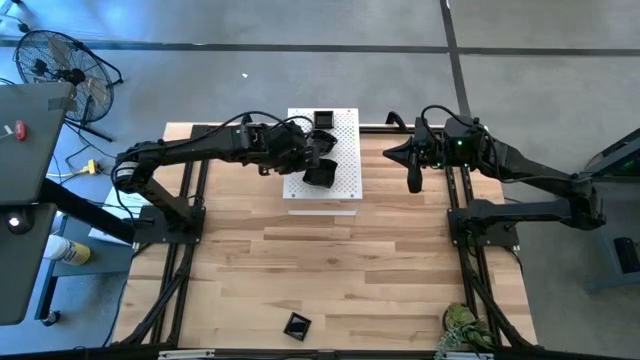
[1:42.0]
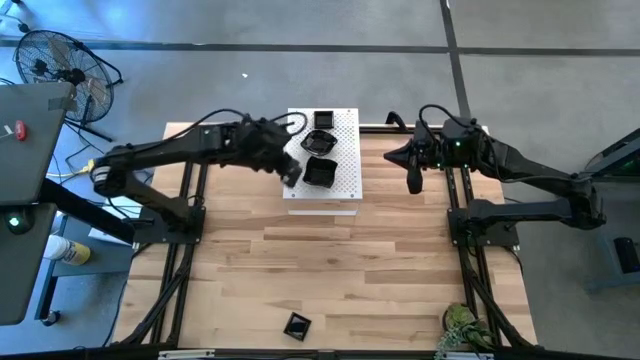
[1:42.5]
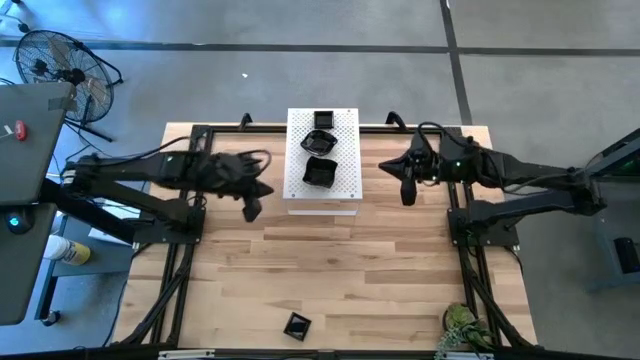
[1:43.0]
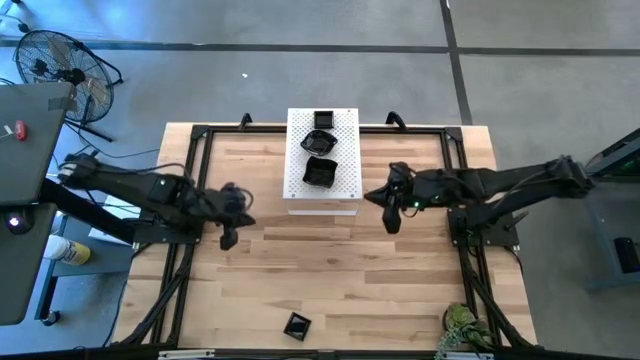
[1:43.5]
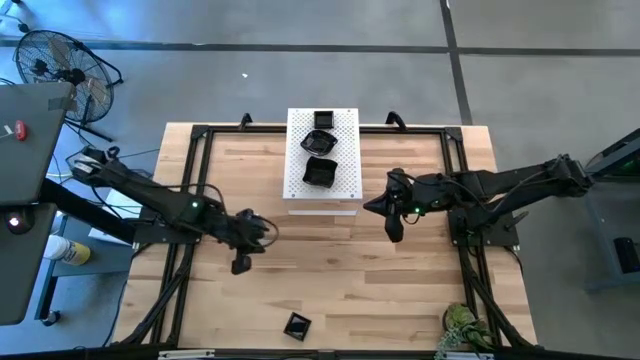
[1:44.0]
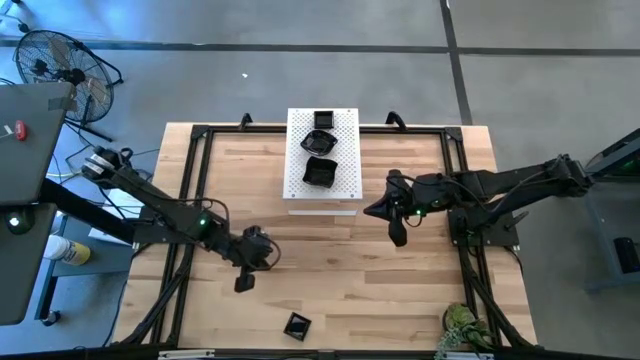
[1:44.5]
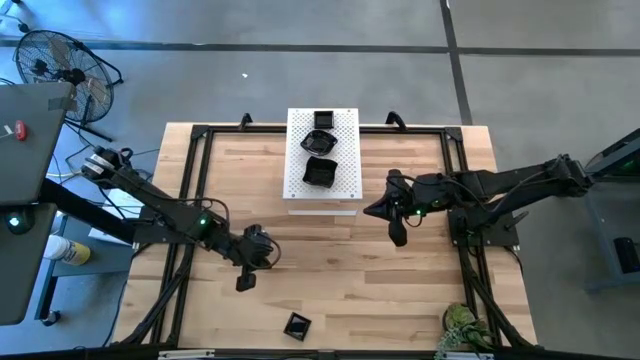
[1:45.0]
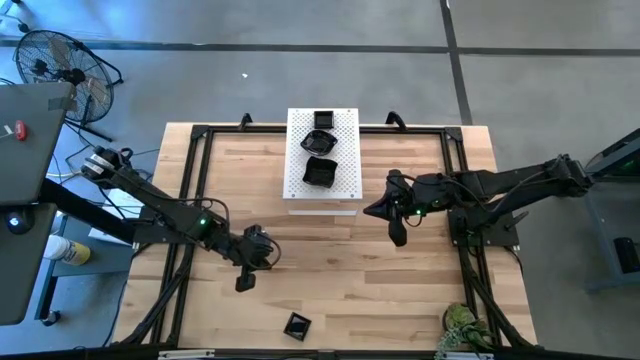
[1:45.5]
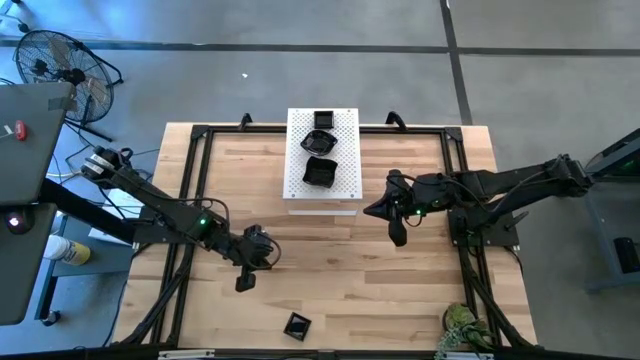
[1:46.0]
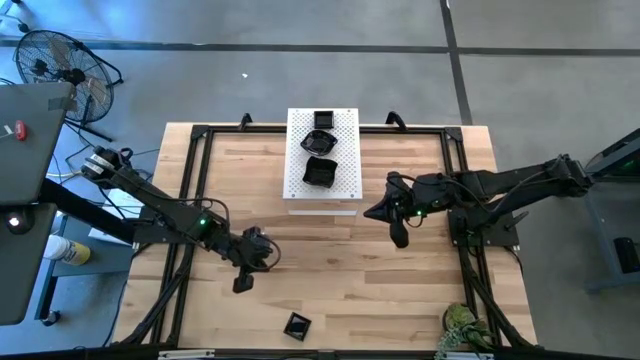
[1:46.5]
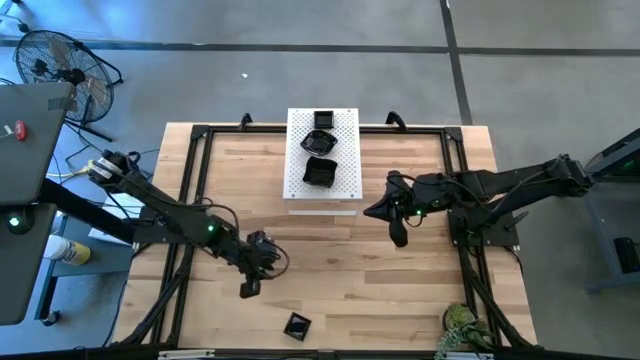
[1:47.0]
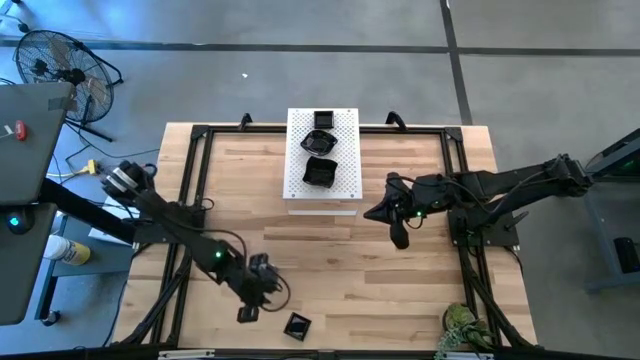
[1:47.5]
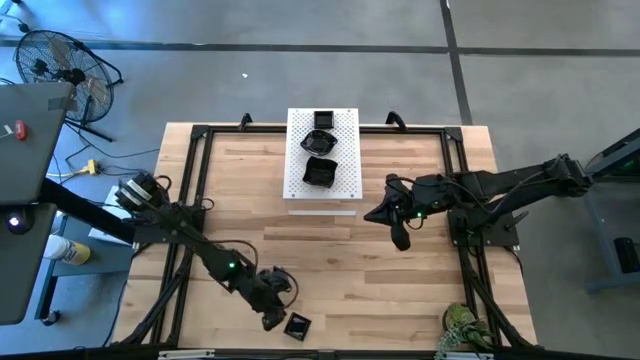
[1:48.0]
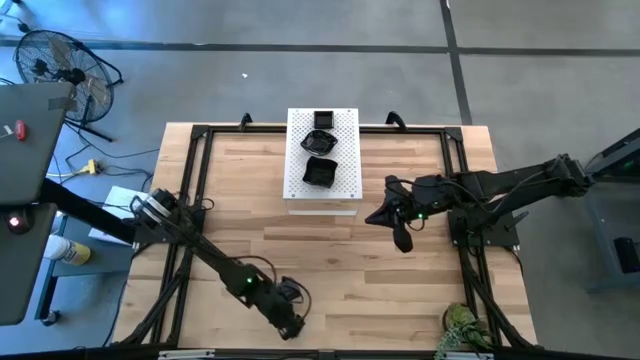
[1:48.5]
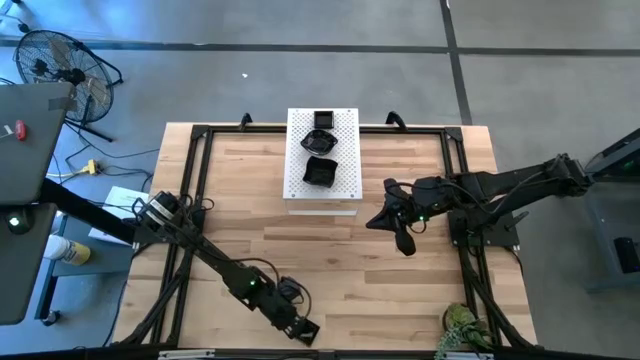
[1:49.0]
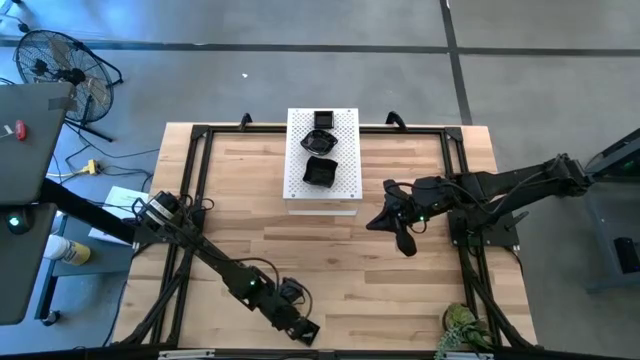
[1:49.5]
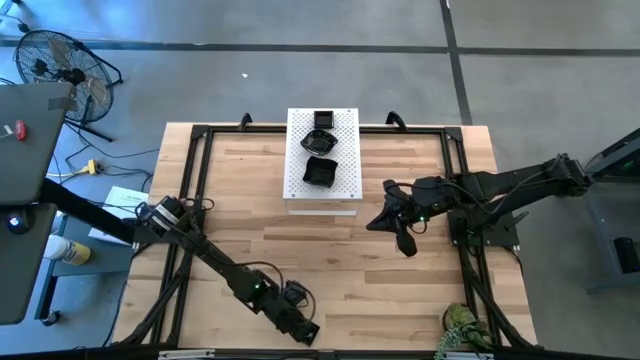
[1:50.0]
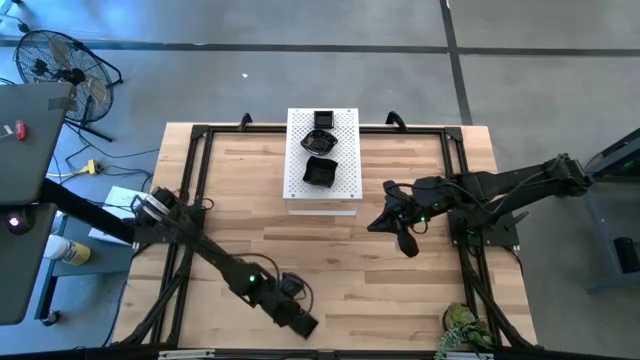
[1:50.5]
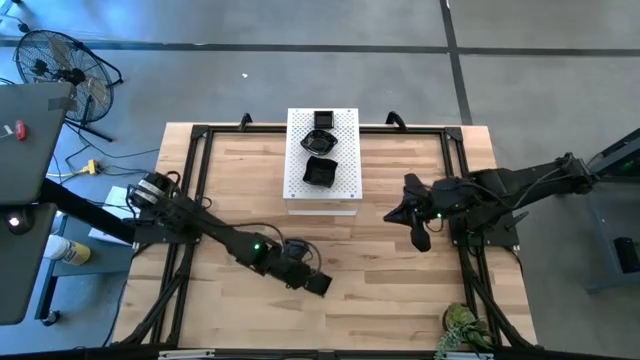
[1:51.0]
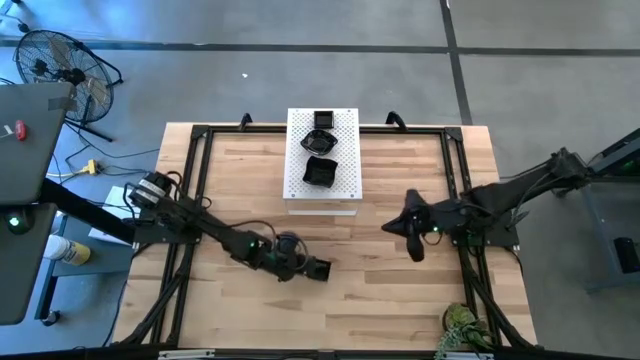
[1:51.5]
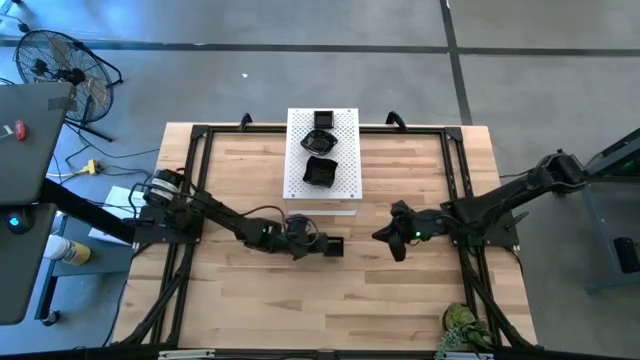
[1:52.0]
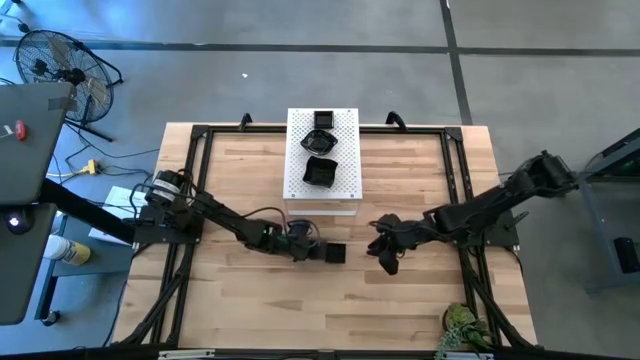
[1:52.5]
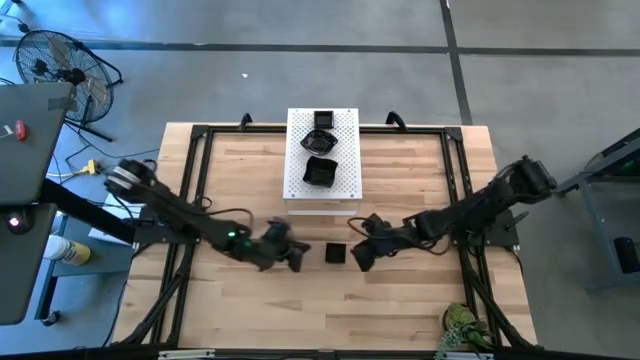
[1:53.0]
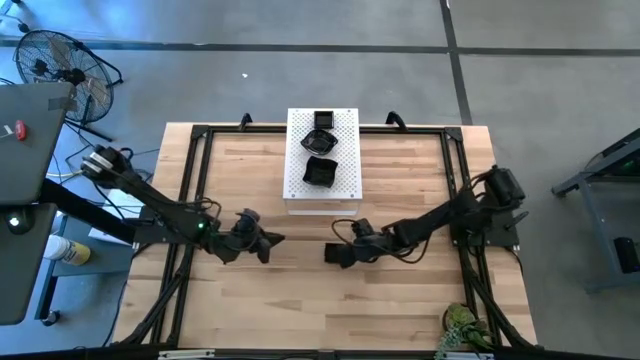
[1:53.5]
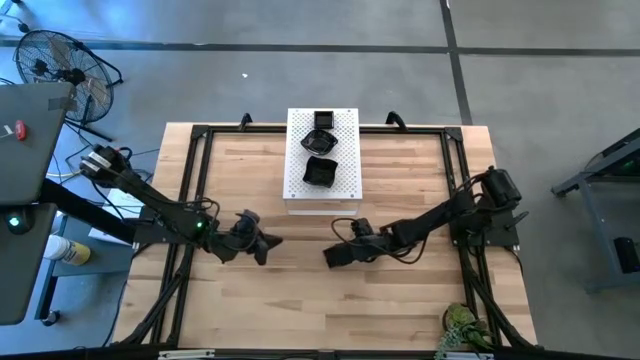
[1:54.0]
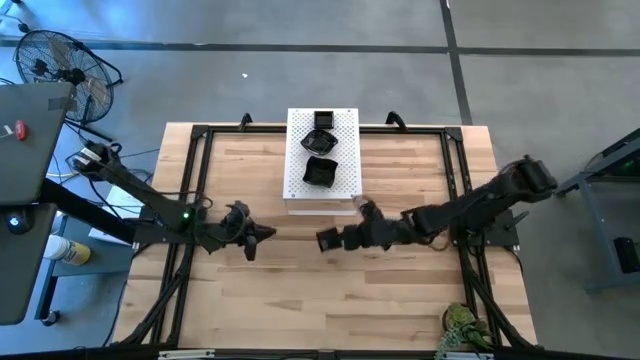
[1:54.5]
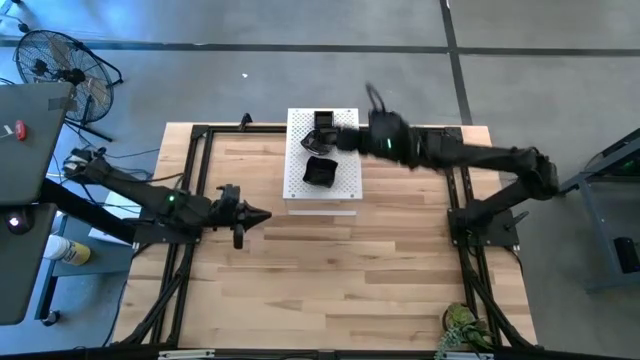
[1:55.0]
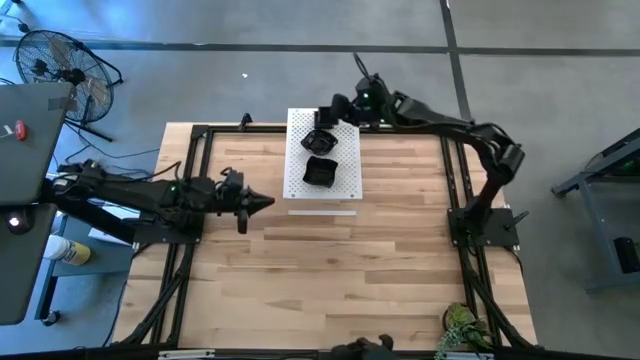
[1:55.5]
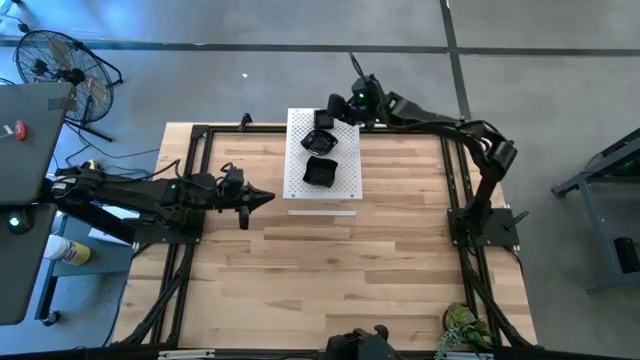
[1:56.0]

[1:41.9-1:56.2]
Task: Pick & Place Mini shaped plates
Stack the square plate on top of the square plate on the shelf

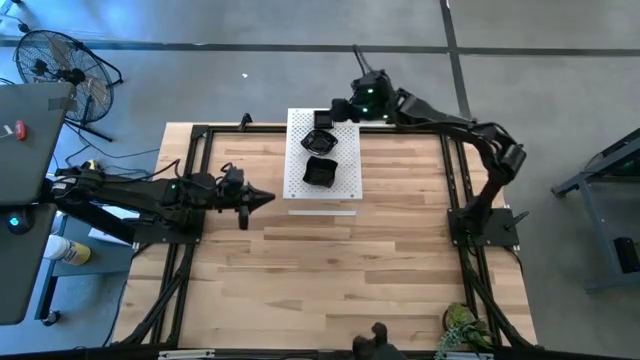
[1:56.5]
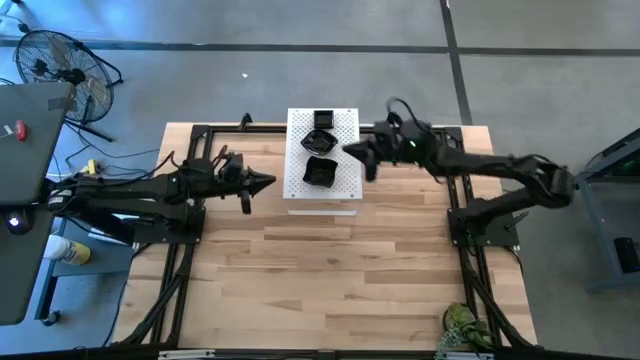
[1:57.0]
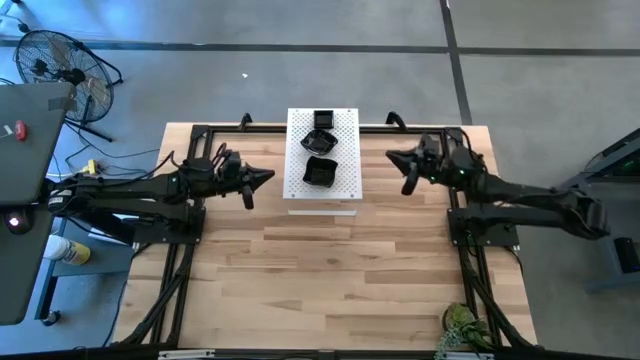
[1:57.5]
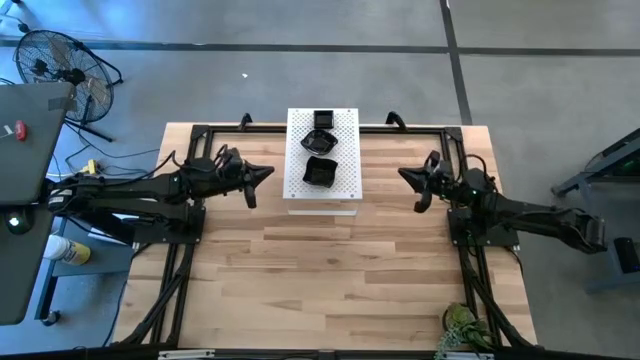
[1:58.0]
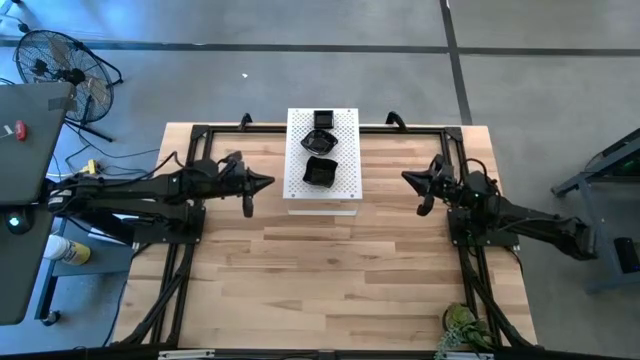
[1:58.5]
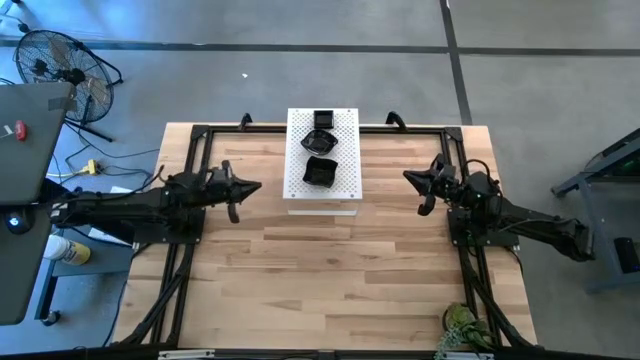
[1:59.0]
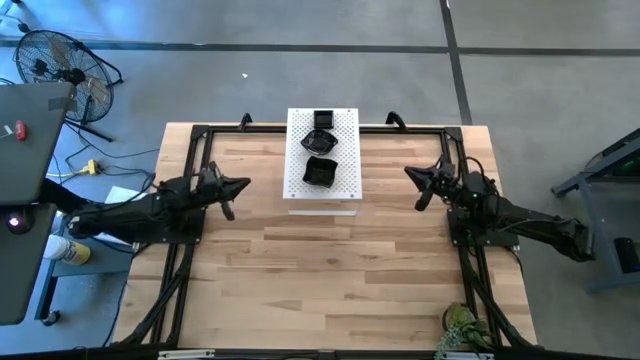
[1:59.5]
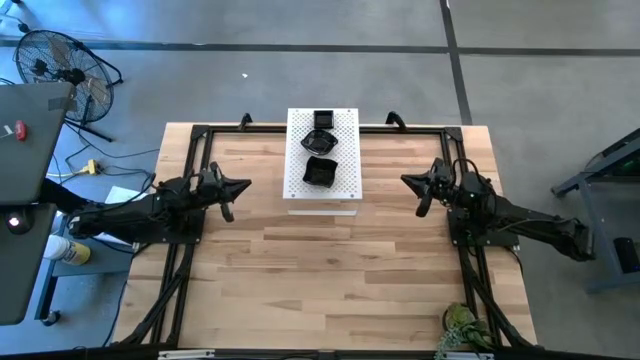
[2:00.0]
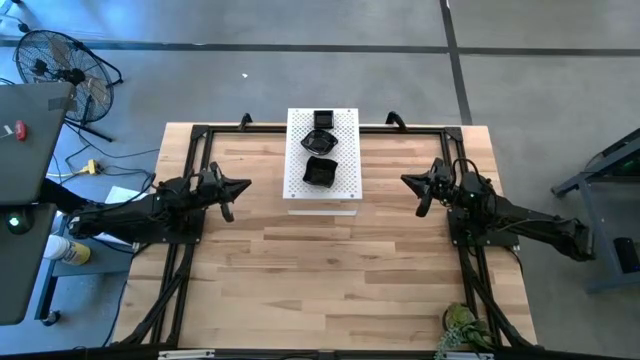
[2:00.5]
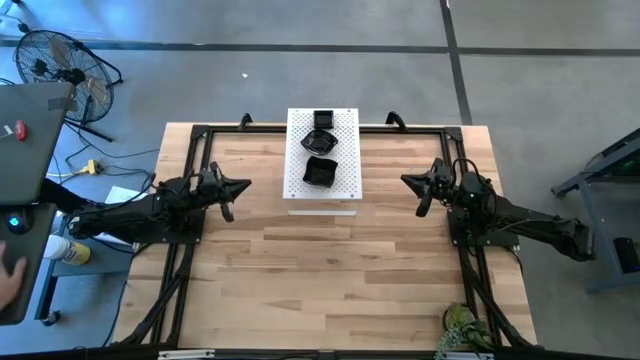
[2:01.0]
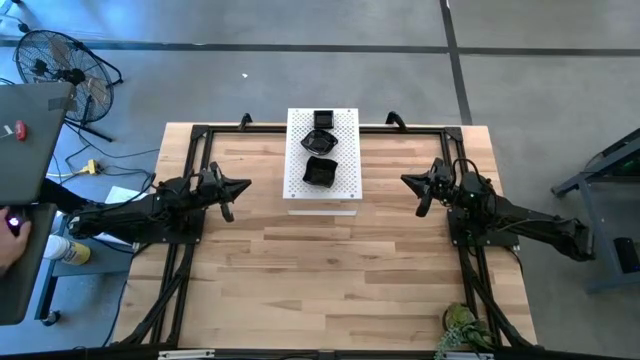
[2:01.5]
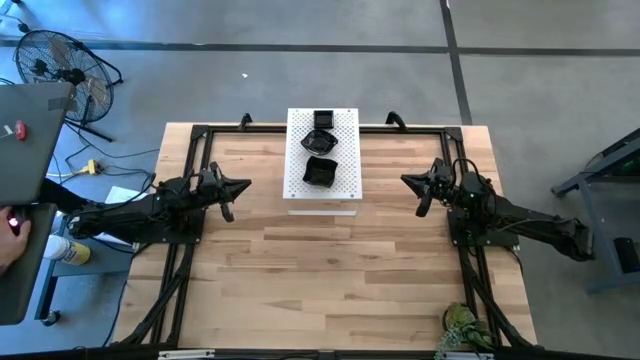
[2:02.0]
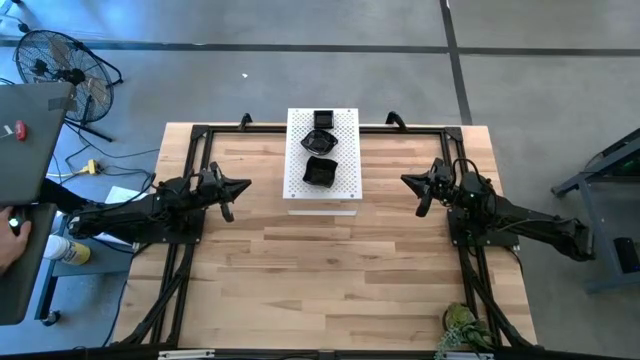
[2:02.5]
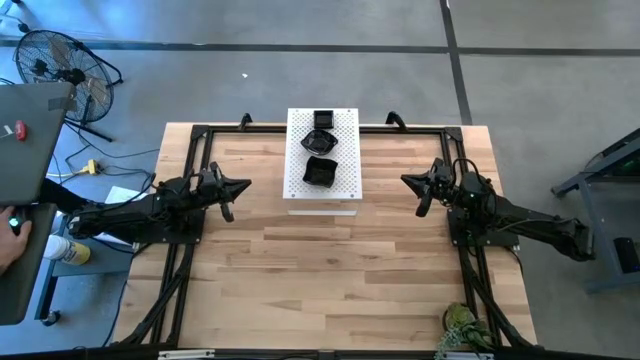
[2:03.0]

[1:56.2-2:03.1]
Return to Home Position
